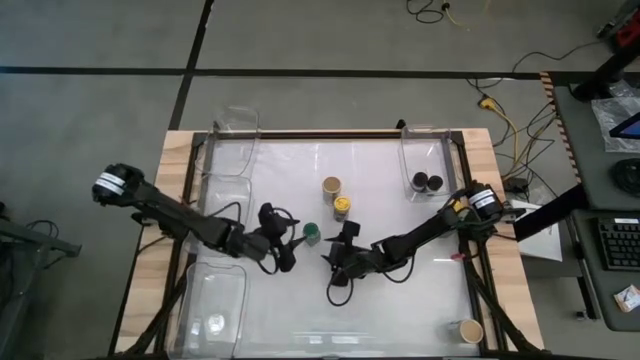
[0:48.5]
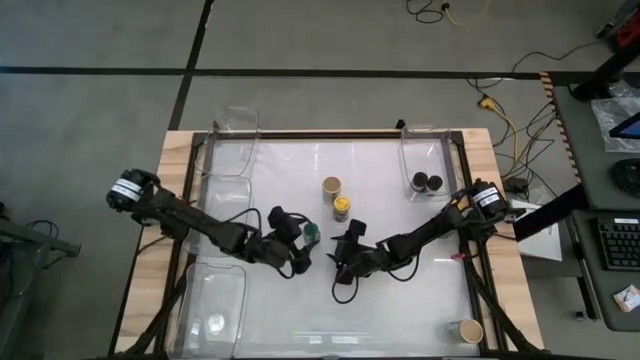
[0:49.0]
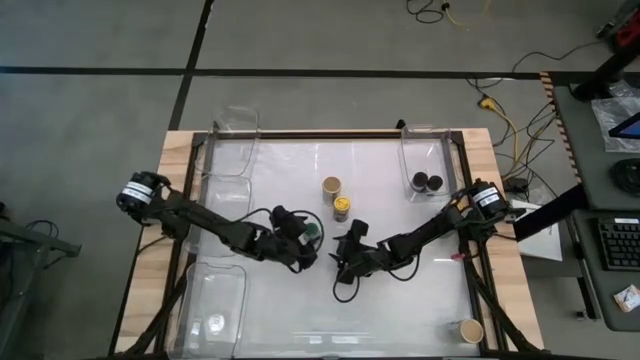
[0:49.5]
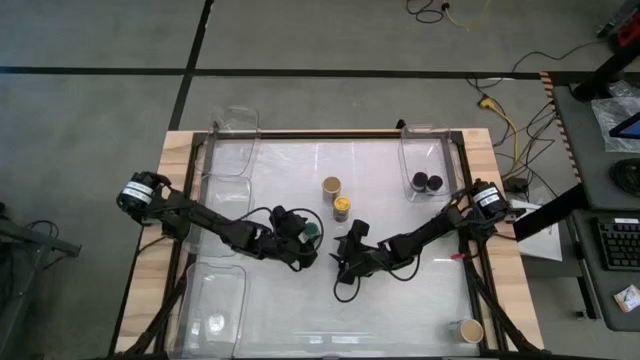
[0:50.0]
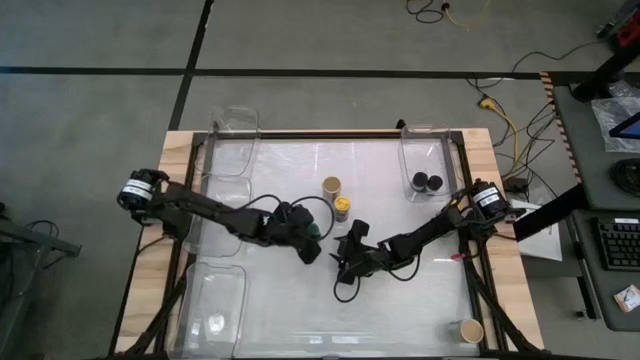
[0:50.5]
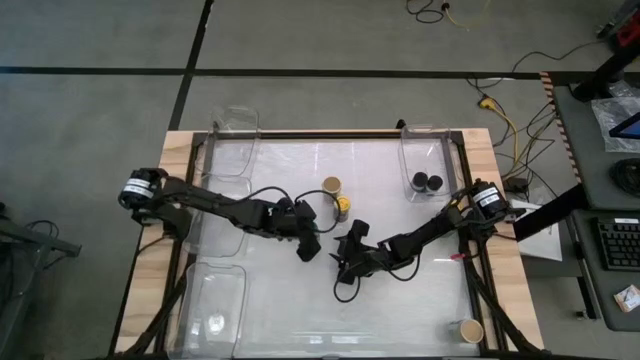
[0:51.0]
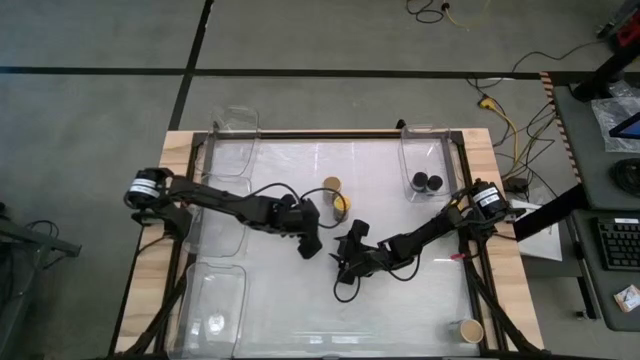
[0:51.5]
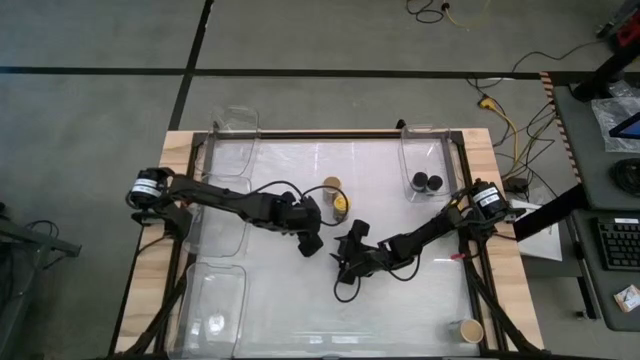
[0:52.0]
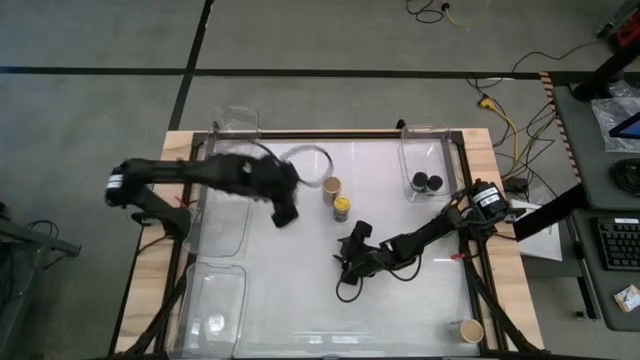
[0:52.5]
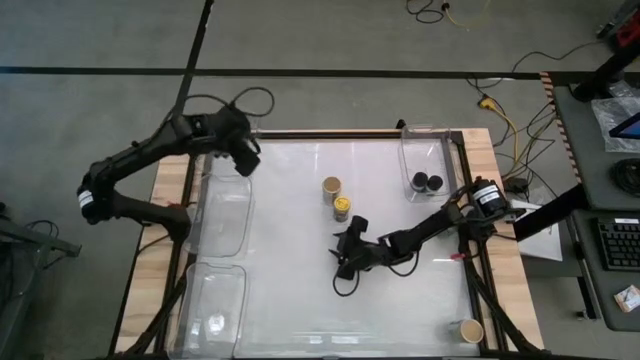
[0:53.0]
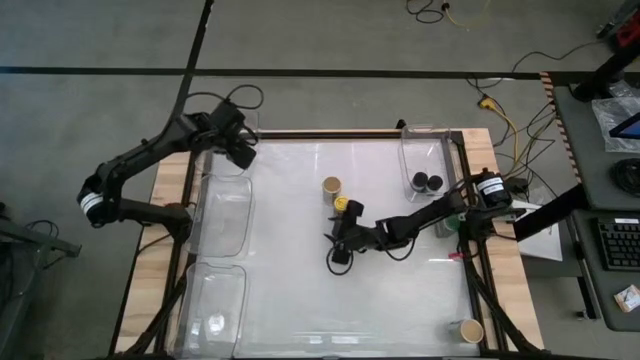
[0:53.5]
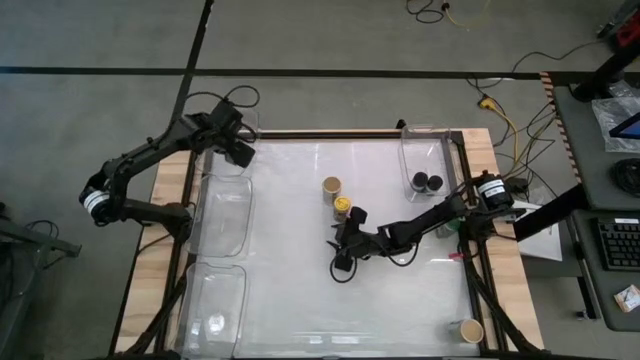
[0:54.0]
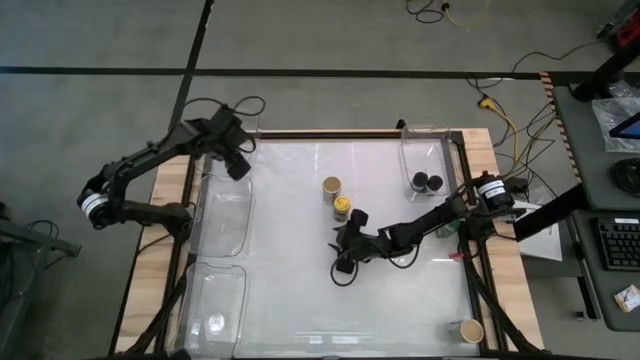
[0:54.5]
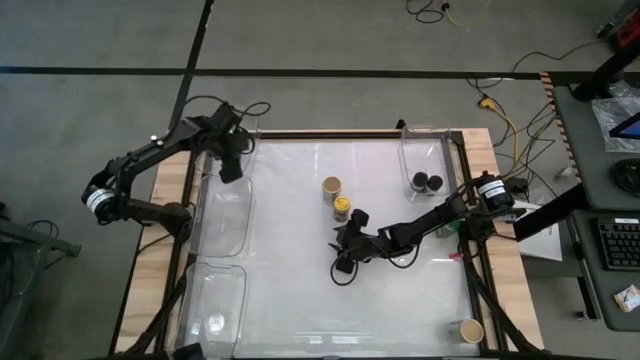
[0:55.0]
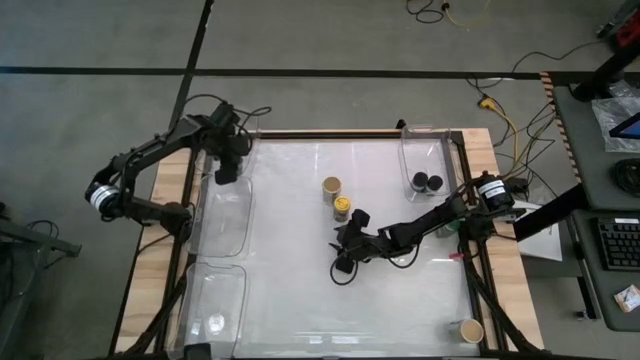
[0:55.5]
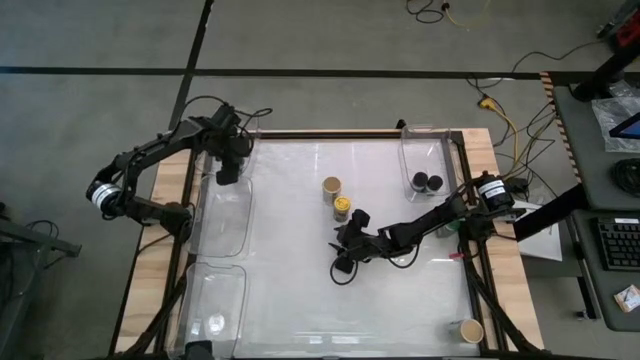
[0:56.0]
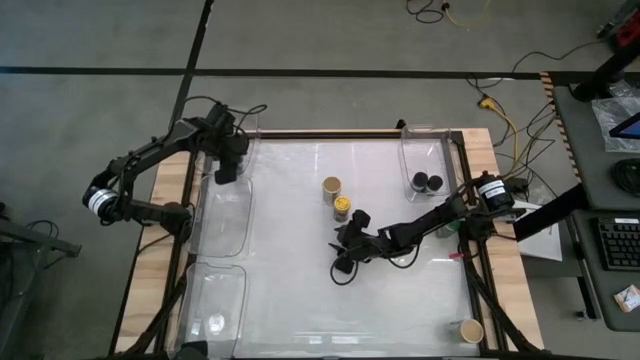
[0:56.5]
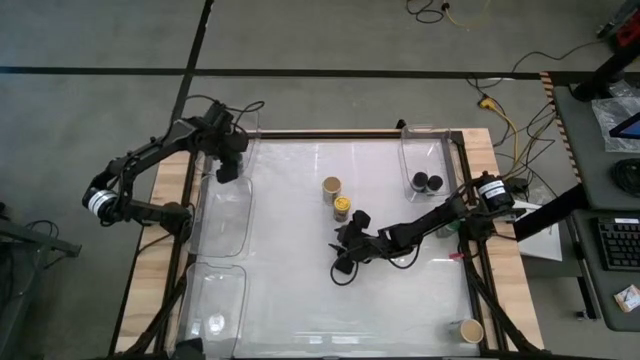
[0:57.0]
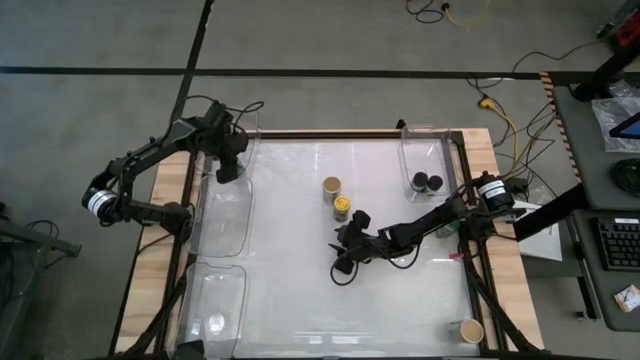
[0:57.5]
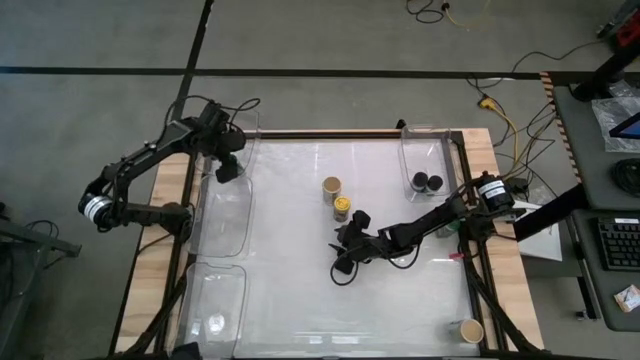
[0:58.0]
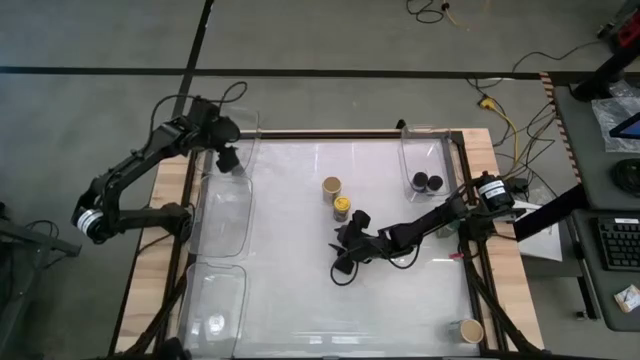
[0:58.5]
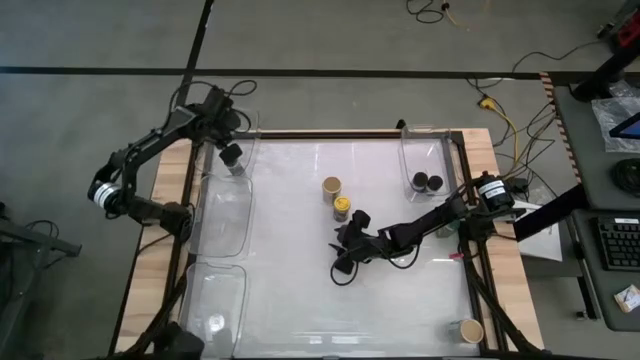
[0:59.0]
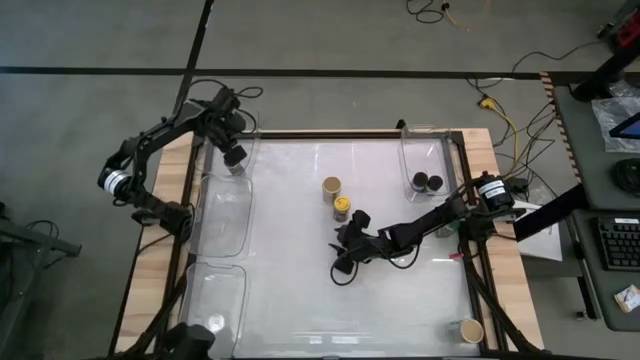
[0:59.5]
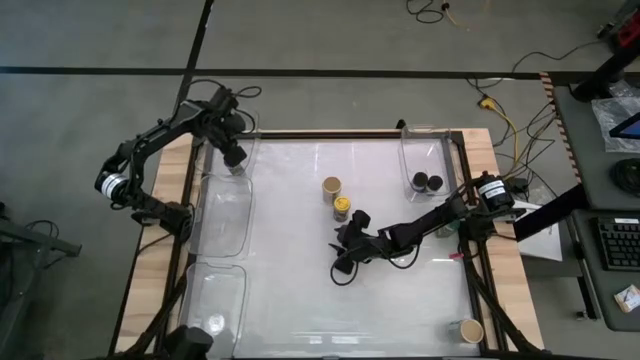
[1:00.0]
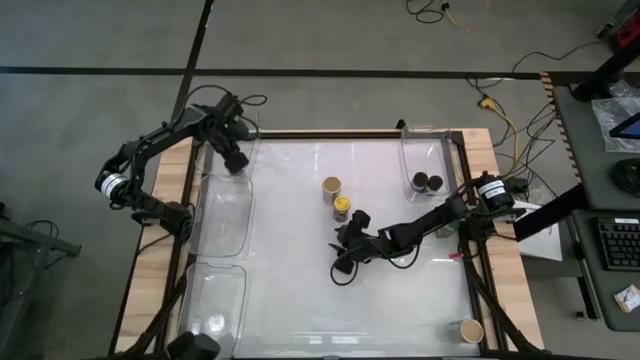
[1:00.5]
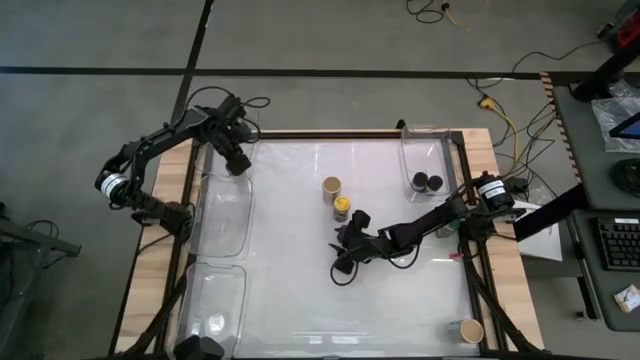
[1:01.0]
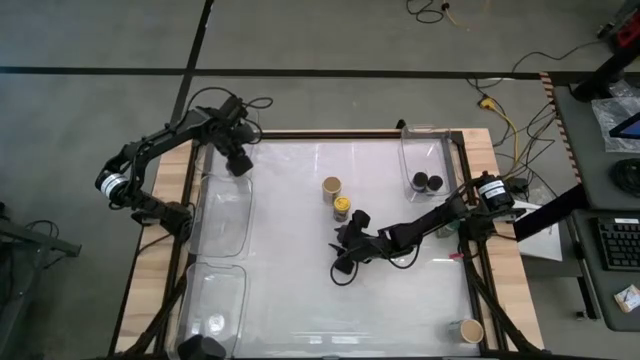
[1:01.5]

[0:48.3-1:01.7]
Task: Sort spices by type
Move the bottom green spice bottle to the center of the table

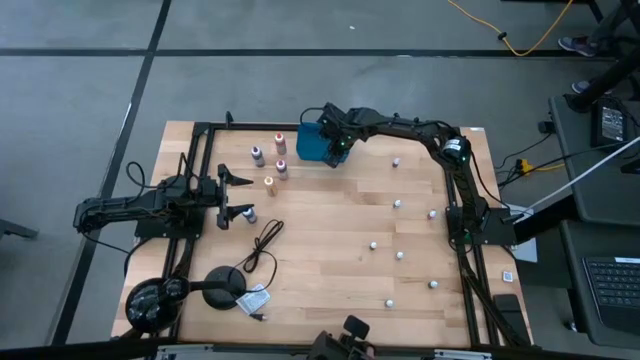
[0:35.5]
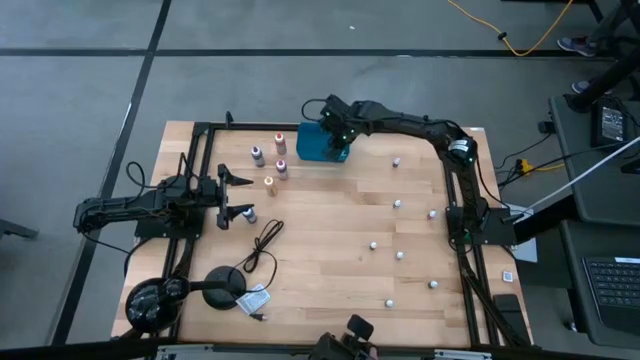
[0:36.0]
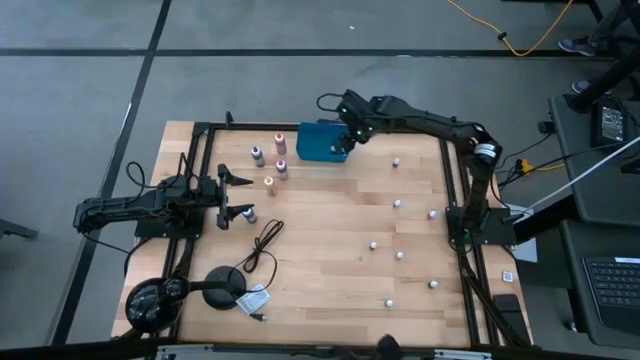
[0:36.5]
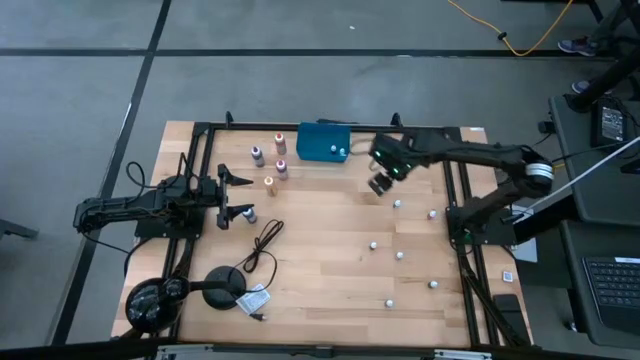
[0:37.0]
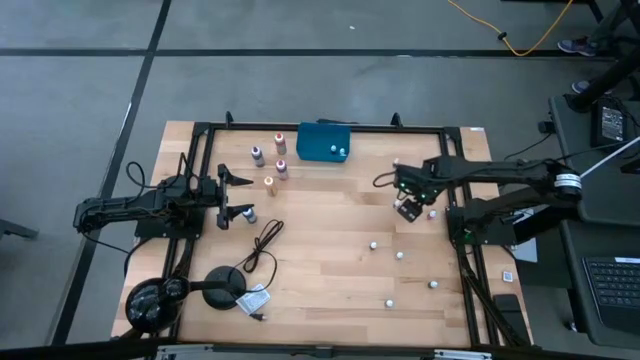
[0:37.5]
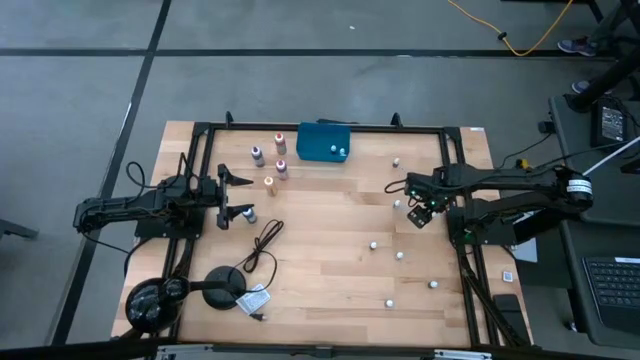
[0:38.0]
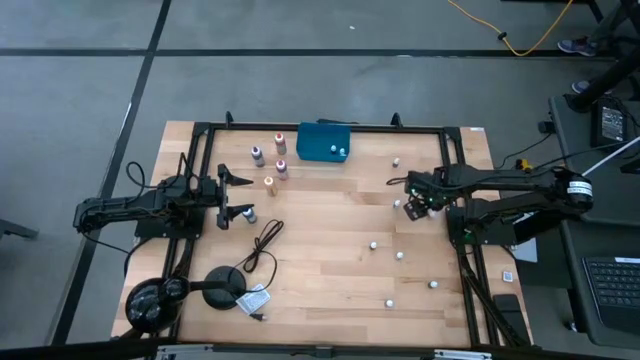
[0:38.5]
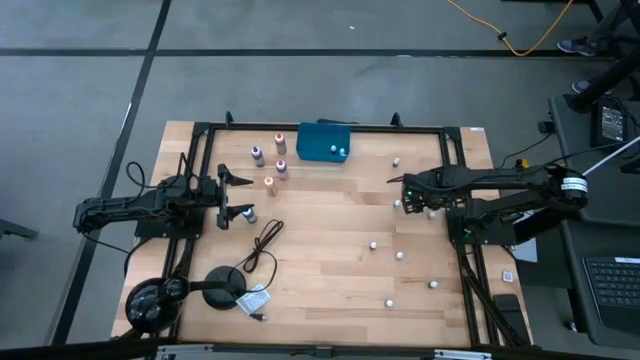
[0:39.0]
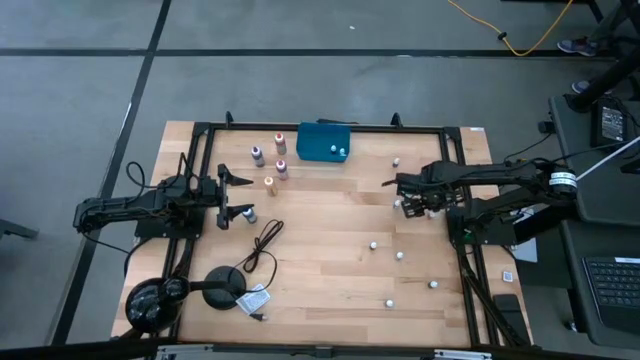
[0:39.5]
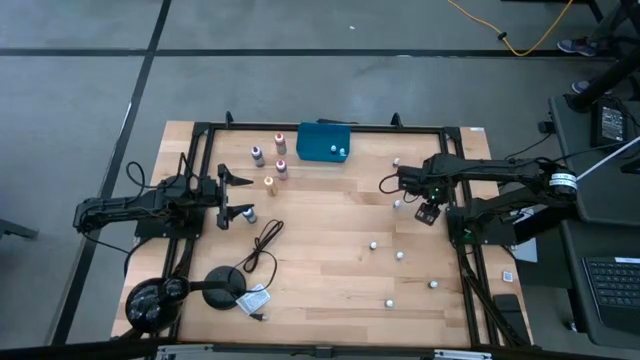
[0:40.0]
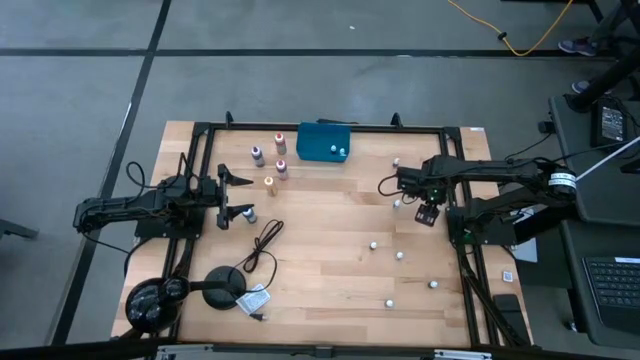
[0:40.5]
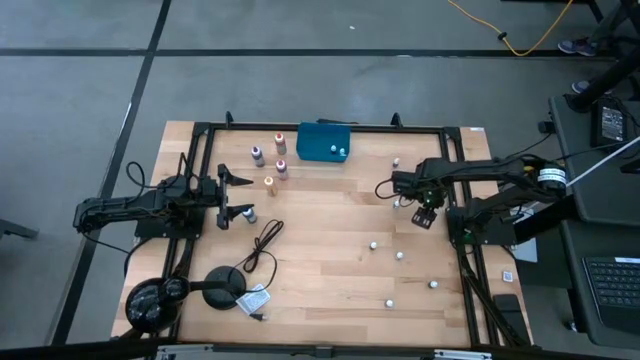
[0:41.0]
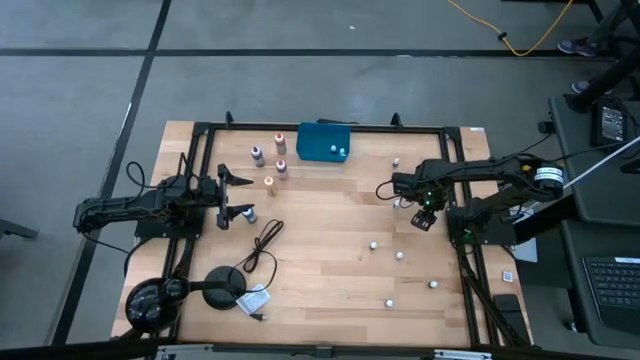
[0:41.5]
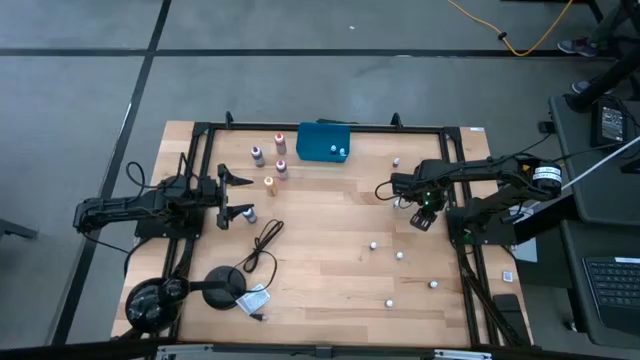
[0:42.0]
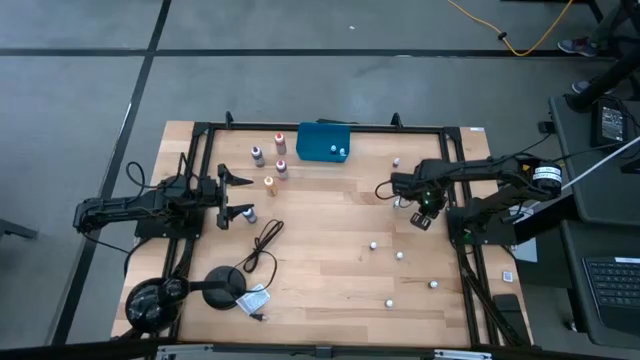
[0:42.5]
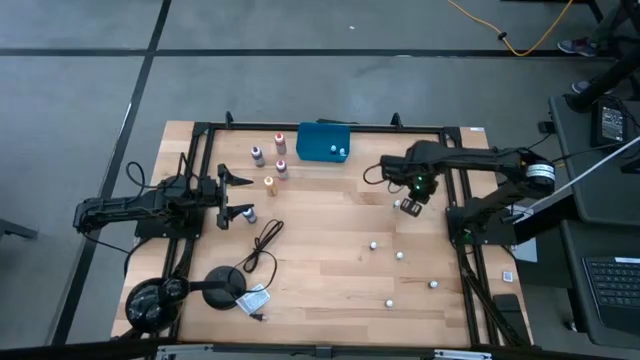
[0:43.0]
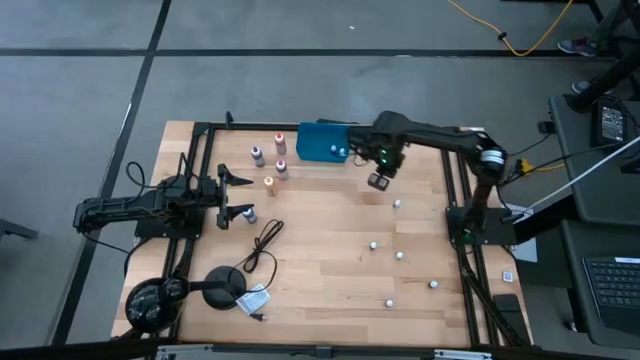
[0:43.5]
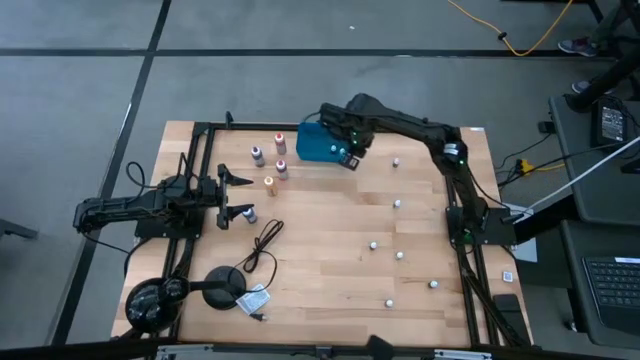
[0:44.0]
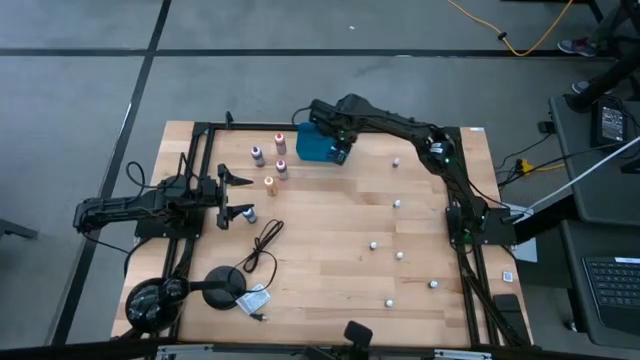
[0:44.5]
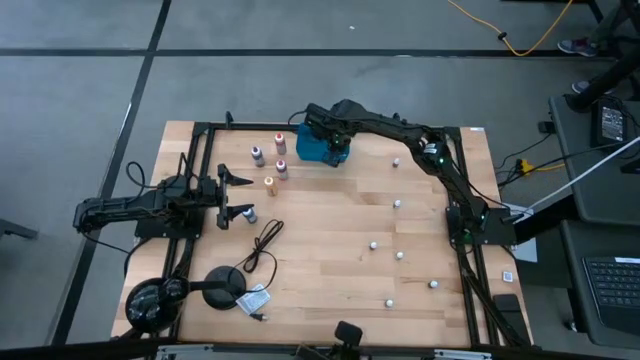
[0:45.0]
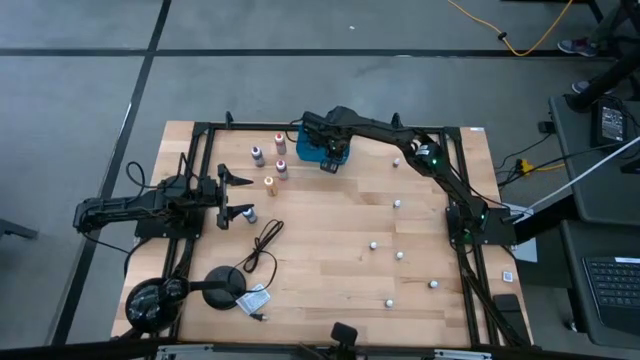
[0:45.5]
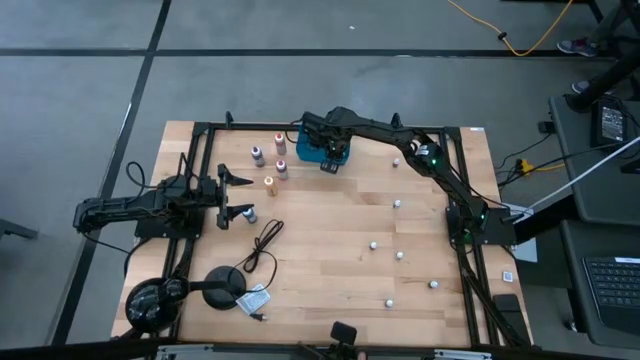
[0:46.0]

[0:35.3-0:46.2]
Task: Pick & Place food coloring
Put the small red food coloring bottle into the blue container
